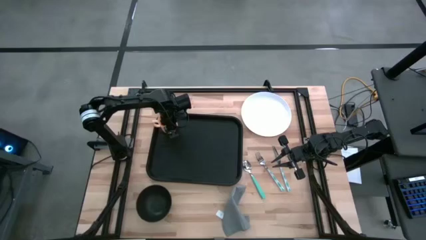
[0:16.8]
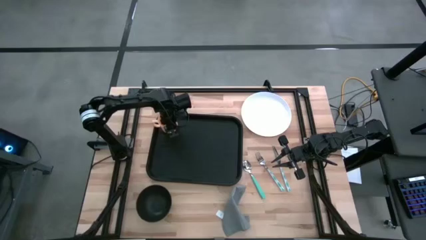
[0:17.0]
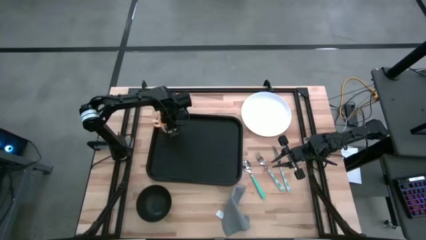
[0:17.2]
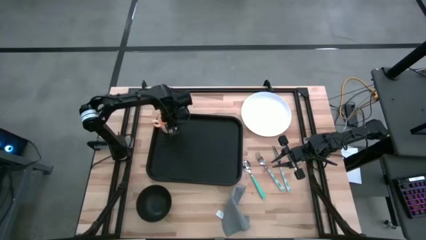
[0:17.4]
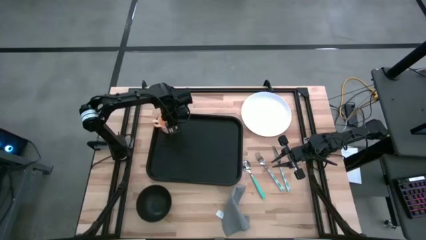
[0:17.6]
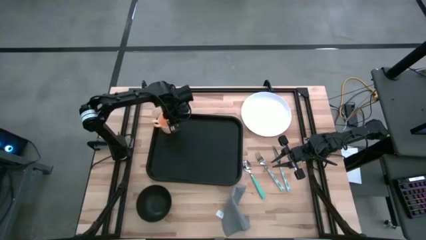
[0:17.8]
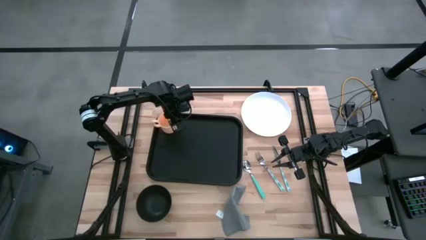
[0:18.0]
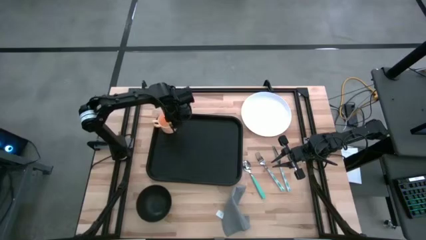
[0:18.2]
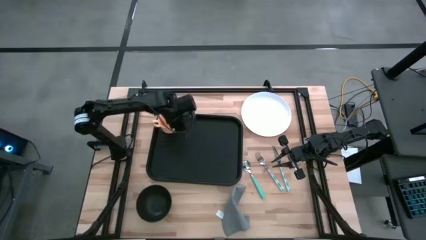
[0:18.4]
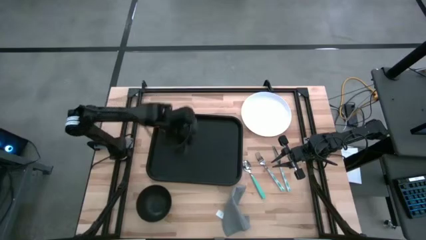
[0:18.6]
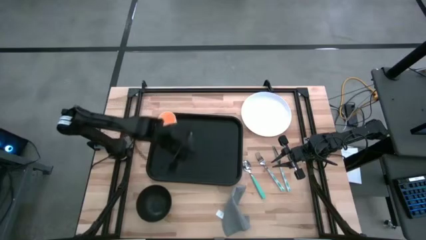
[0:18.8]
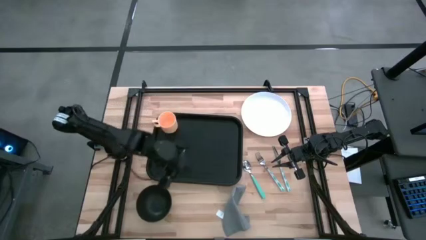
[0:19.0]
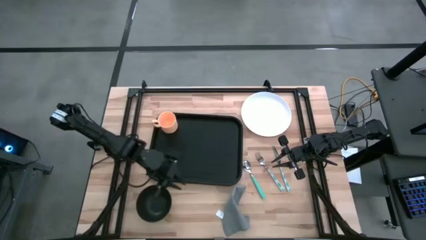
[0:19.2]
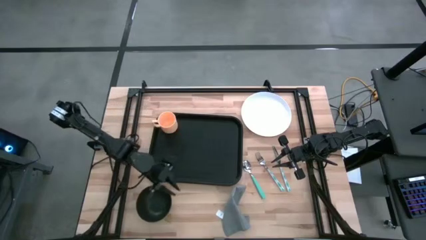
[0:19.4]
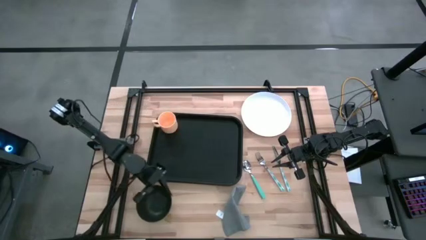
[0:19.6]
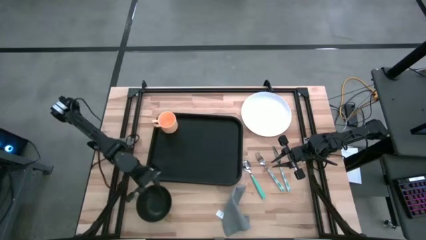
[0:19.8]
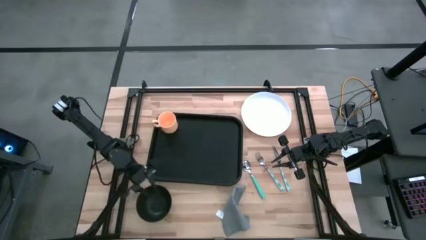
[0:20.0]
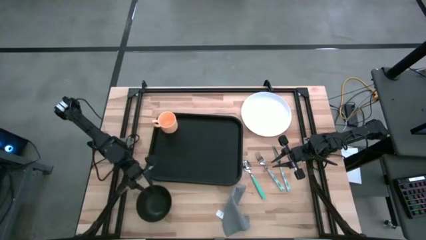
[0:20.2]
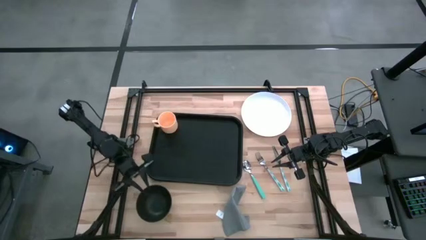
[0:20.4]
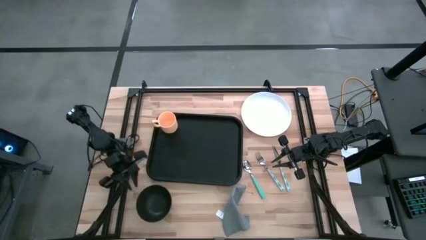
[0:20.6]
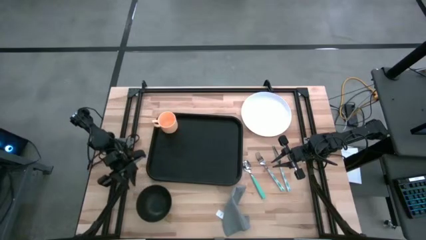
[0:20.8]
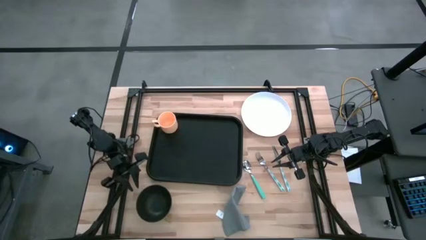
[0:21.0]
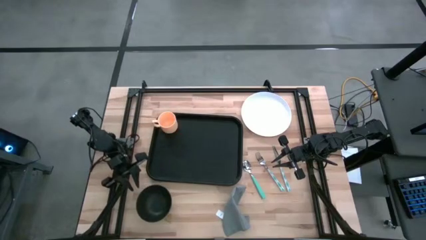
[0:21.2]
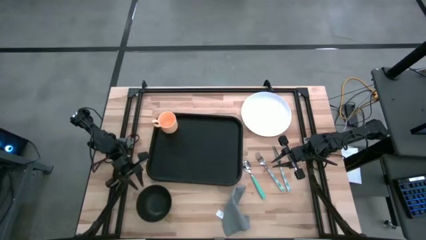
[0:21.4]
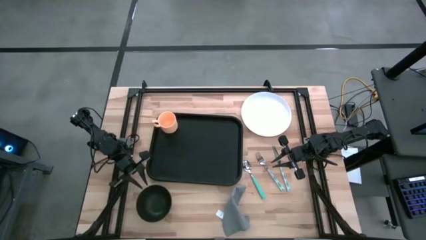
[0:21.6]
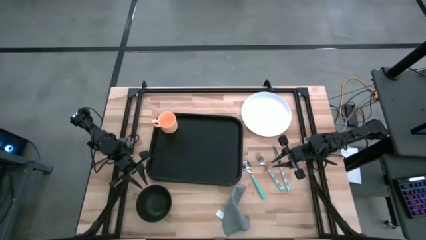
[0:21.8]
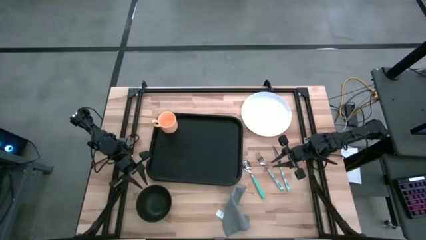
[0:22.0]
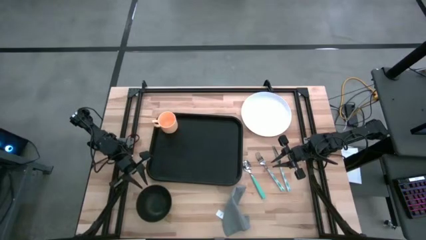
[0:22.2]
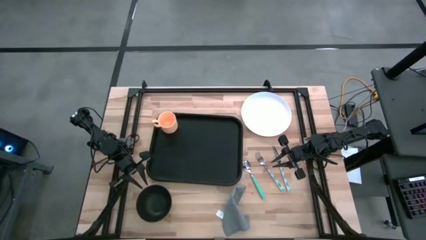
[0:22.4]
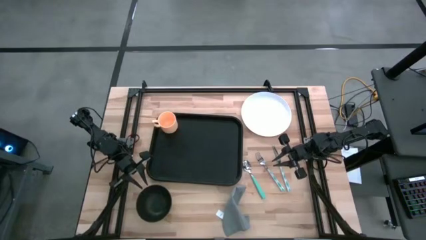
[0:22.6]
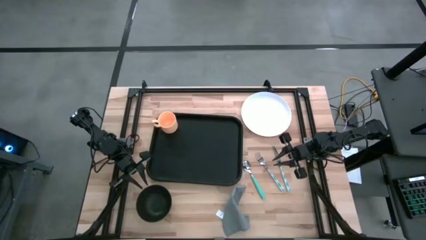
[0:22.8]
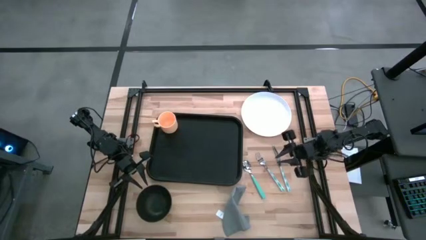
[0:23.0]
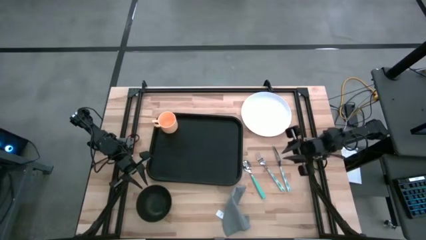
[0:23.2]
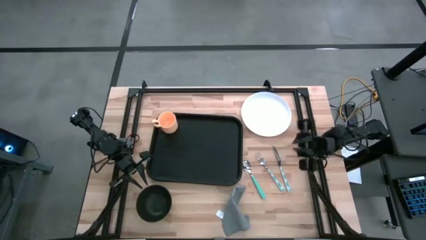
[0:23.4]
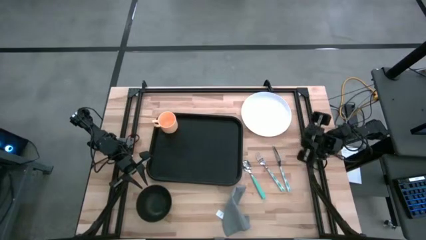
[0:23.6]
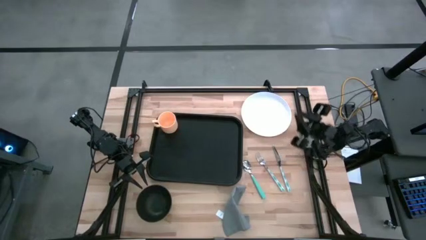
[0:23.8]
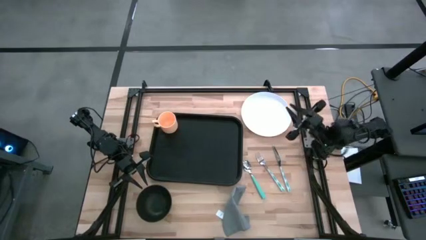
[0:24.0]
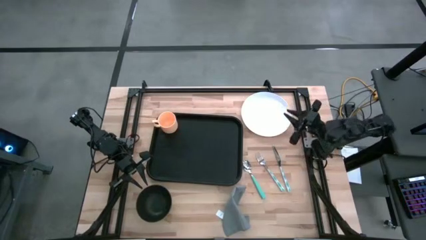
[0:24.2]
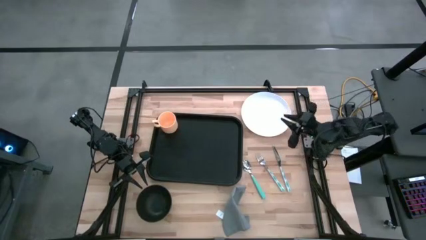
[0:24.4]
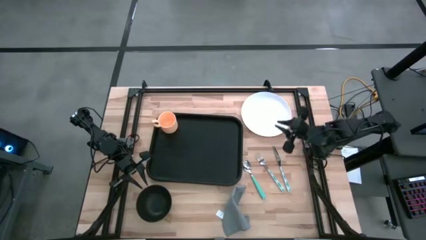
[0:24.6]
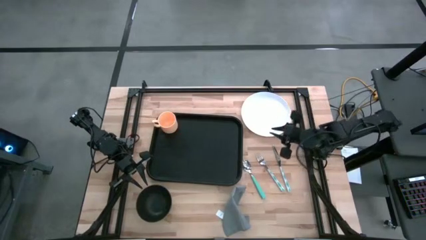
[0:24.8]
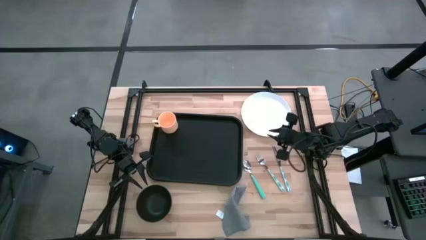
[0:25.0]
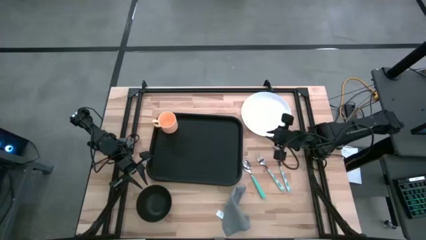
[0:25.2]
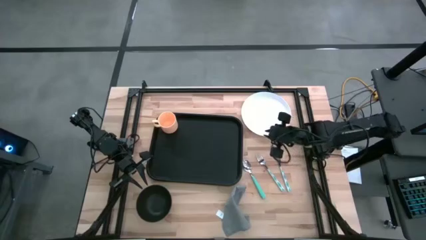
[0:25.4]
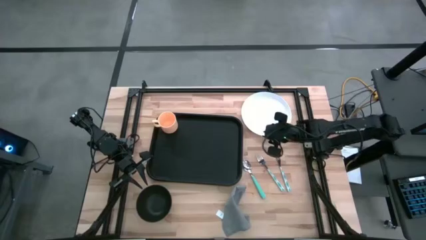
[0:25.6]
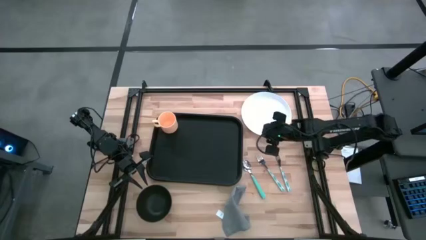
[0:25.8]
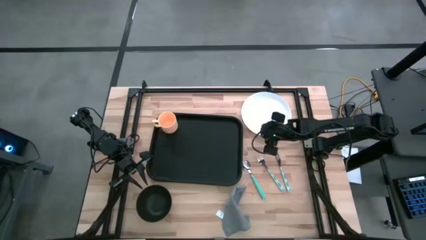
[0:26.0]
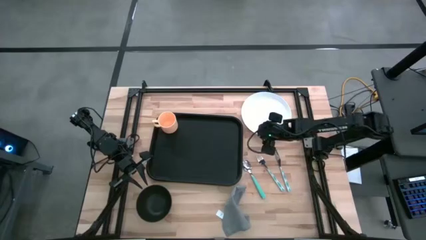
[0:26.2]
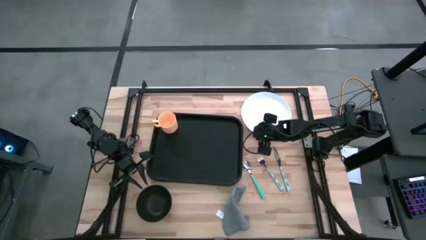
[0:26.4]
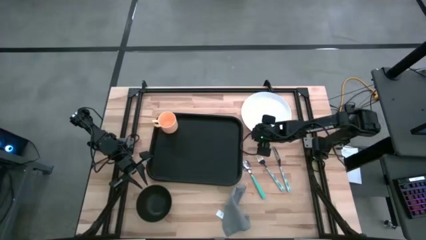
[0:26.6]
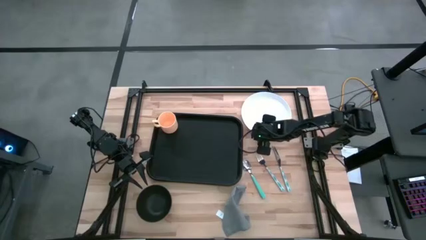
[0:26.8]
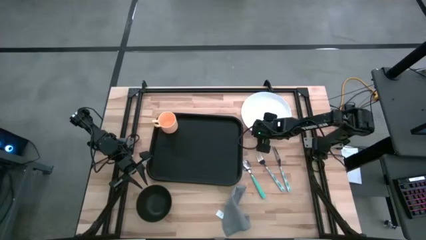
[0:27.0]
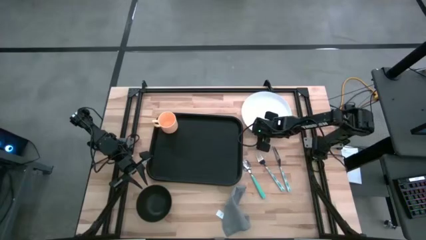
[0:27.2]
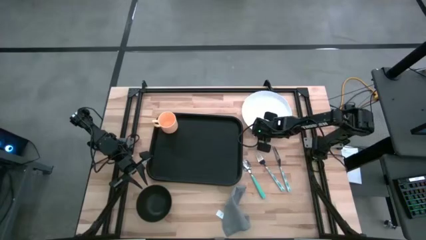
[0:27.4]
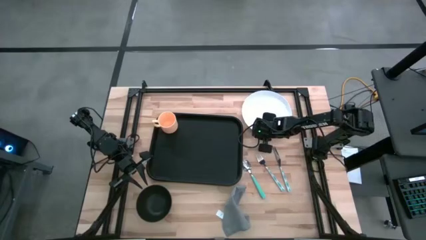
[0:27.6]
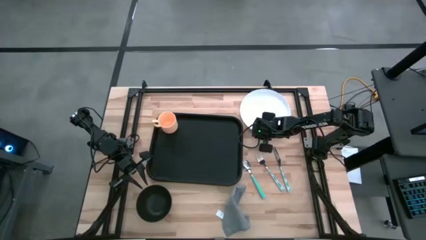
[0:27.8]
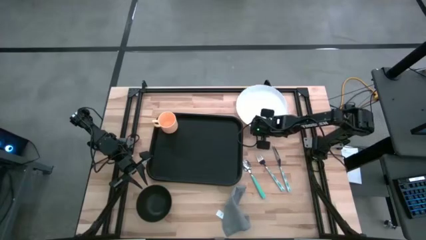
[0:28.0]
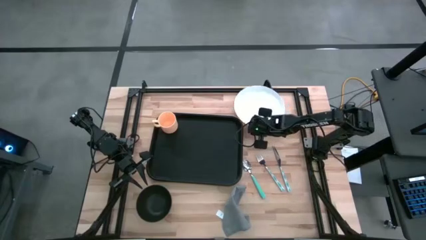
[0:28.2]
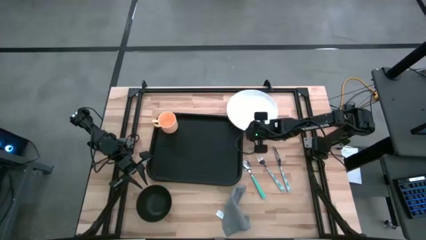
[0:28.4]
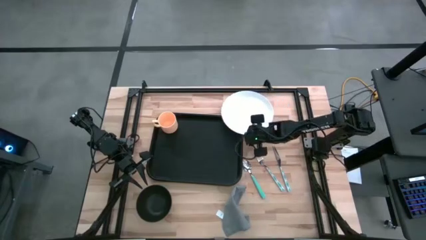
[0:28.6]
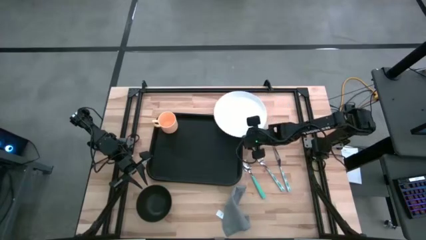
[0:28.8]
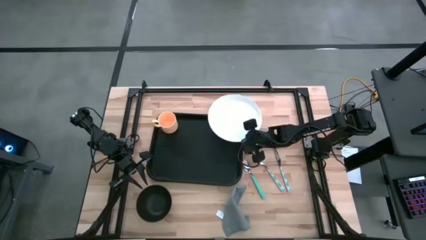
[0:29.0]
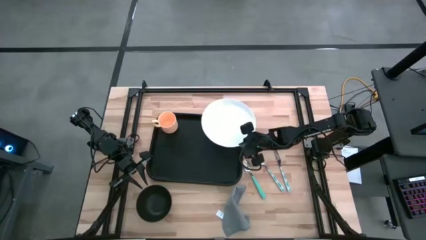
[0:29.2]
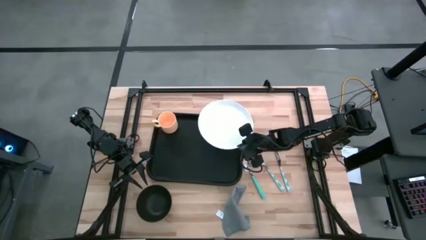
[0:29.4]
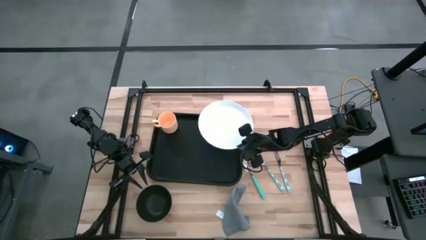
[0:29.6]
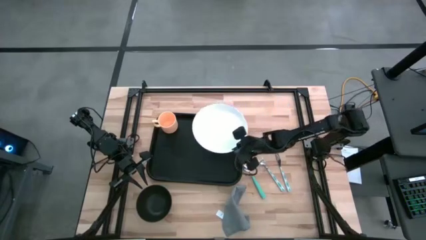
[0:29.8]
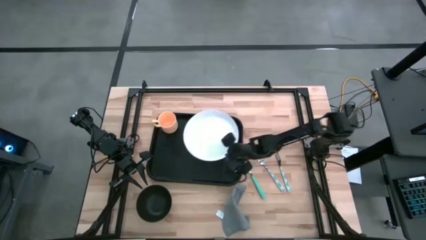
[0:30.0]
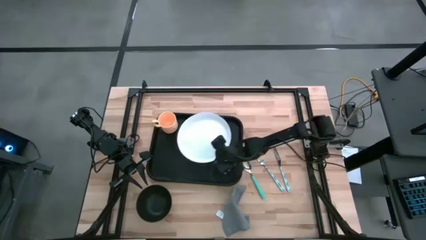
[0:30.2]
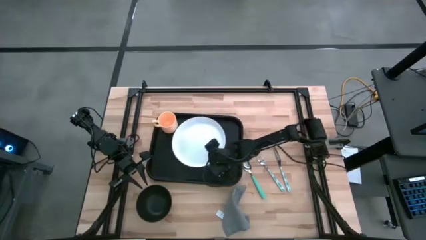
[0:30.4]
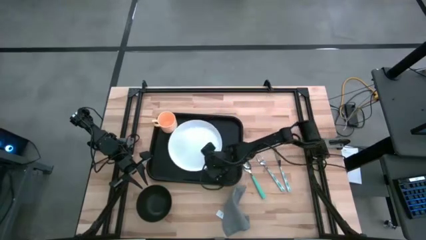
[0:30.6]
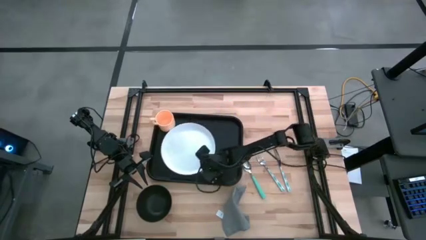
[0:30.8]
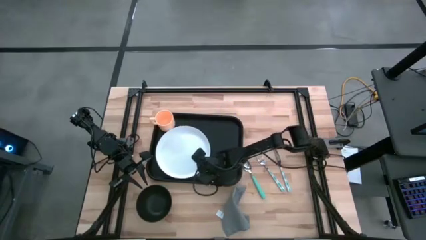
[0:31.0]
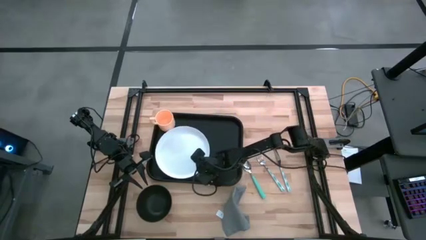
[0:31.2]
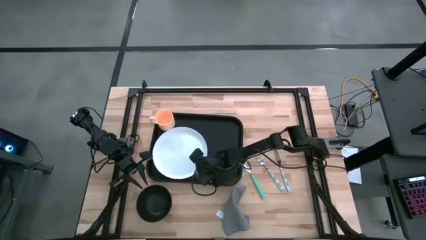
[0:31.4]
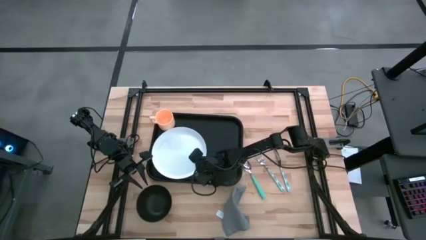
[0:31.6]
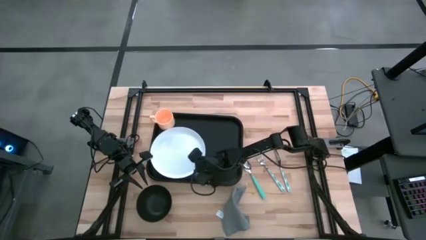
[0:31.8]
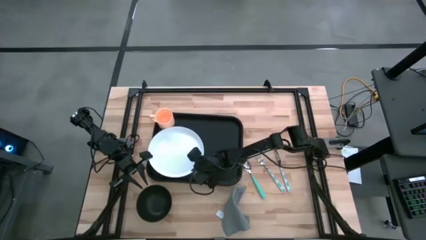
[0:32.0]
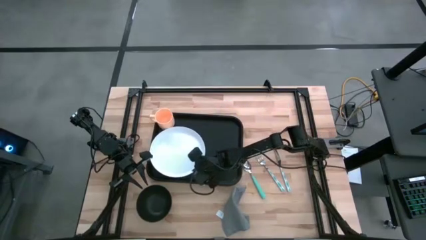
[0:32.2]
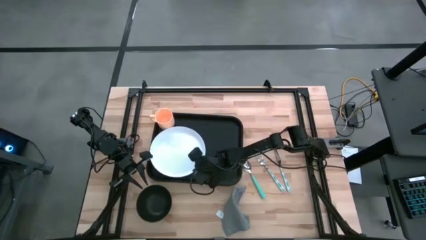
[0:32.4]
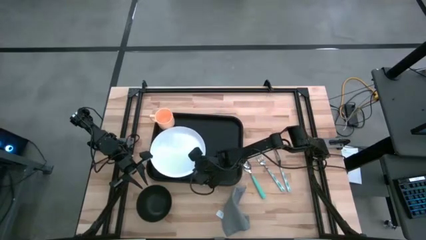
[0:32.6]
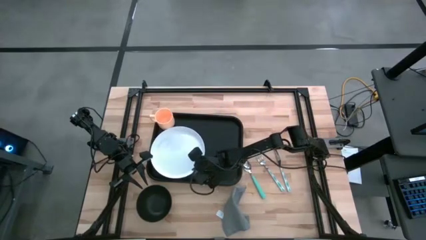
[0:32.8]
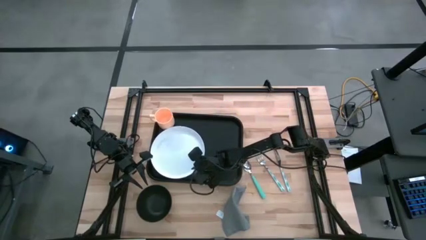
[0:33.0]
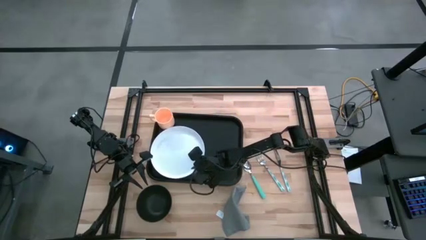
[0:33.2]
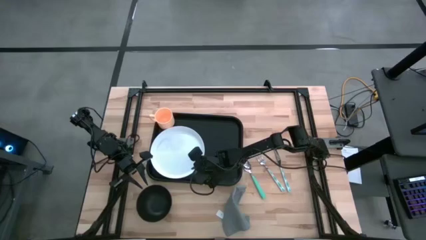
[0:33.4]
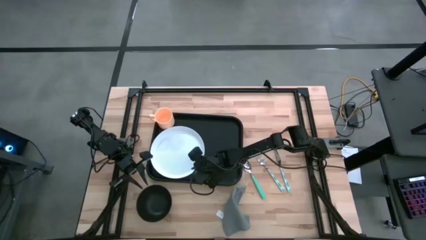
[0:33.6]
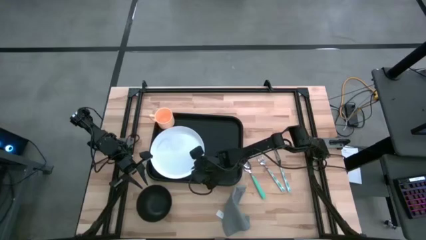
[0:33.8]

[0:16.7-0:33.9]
Task: Set up tray
Put the white plate on the black serving tray to the bottom of the orange cup
